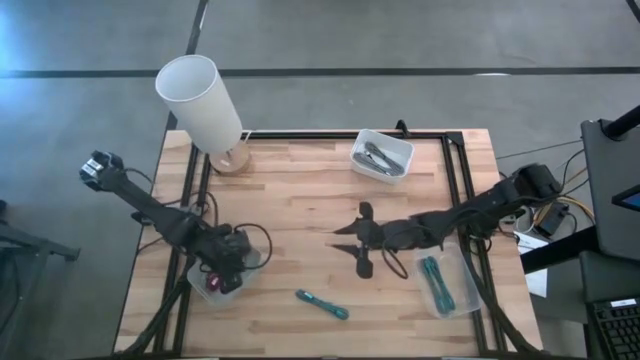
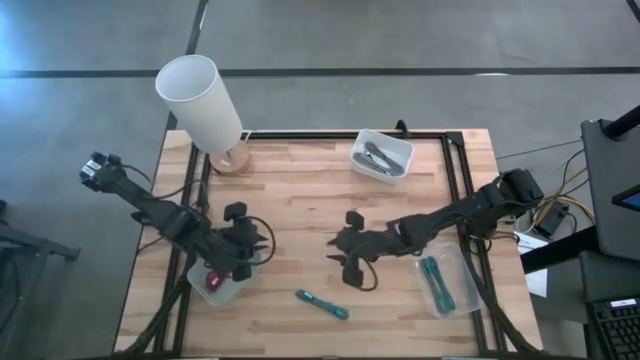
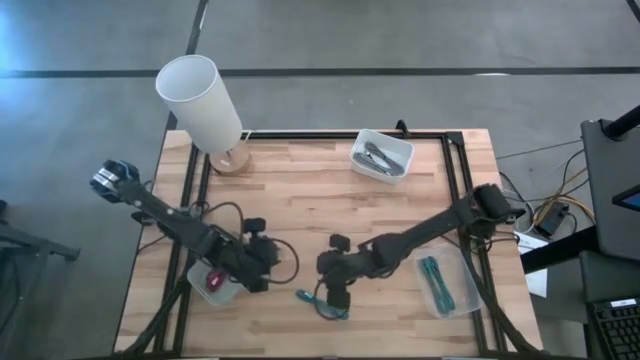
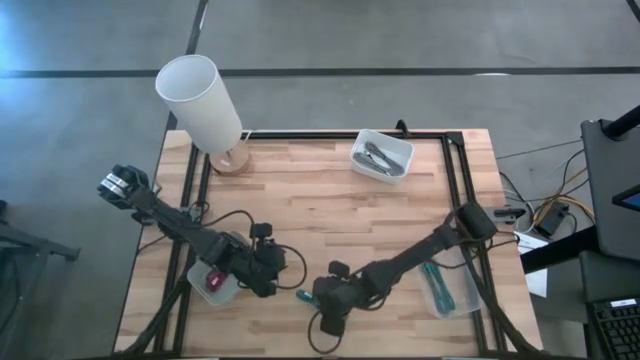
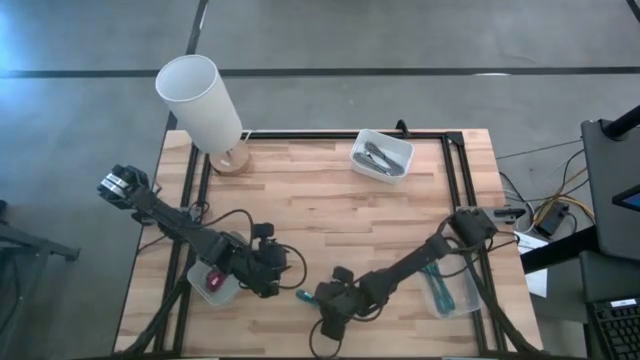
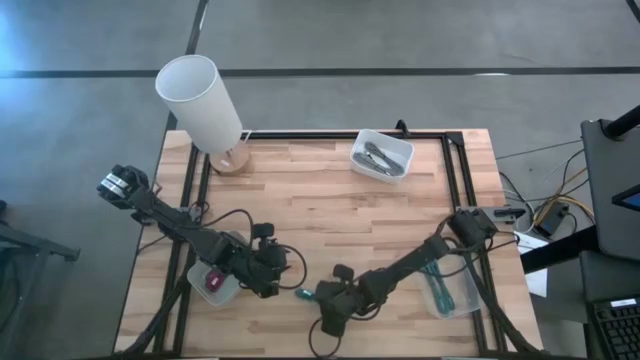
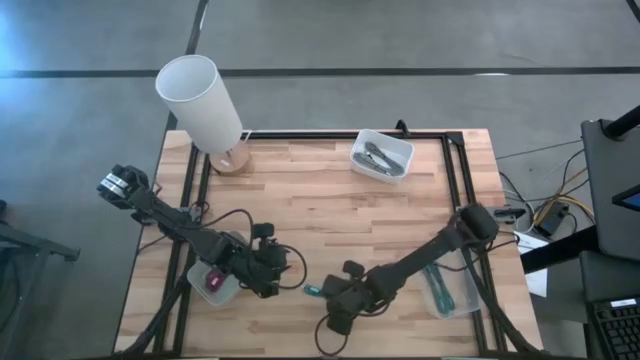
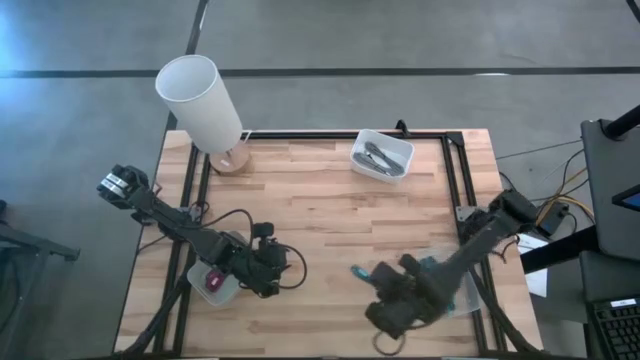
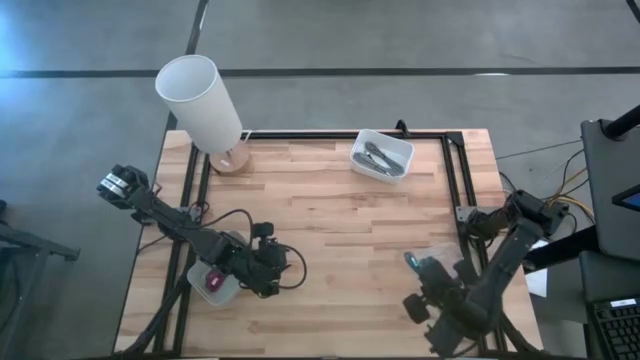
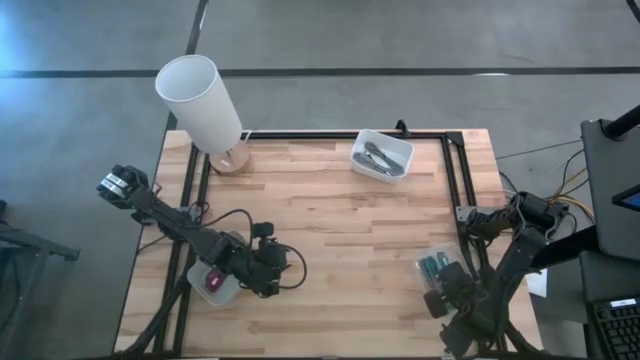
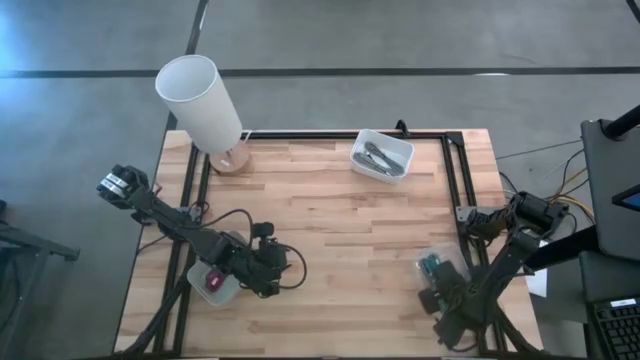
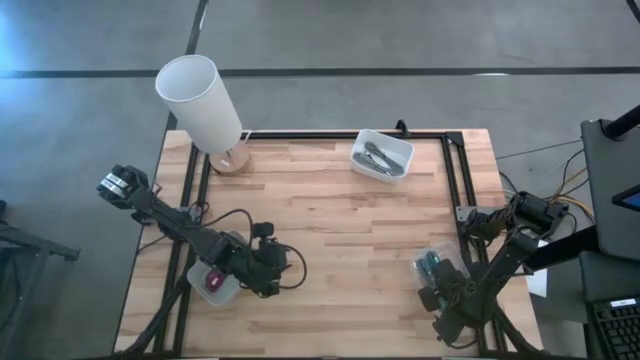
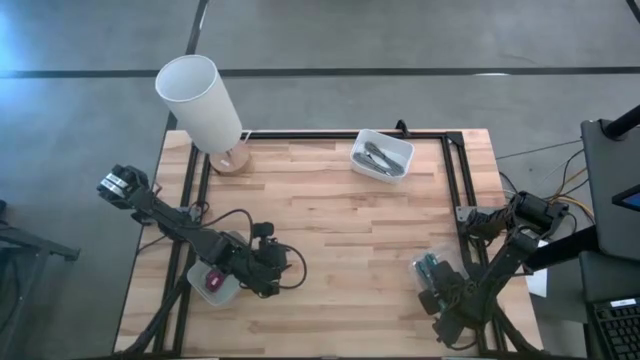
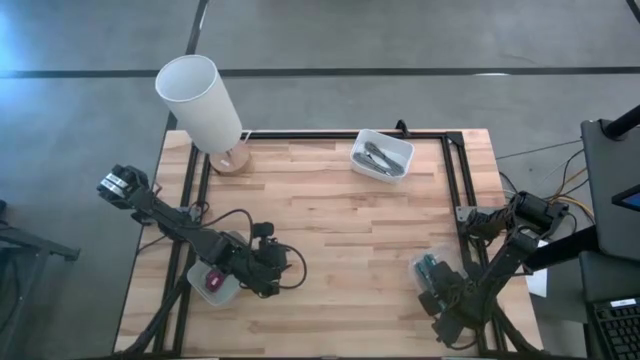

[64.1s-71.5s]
Task: Pick & Place USB Port
Put the blue patterned charger cable into the transparent bin

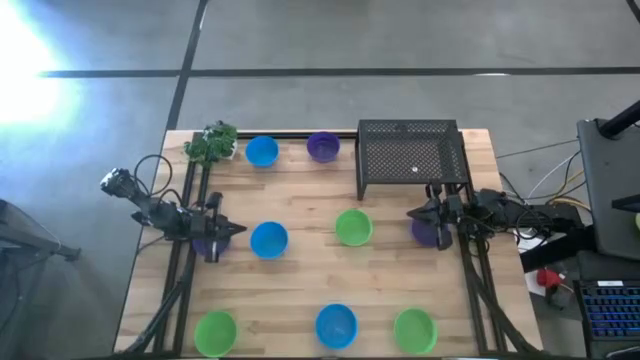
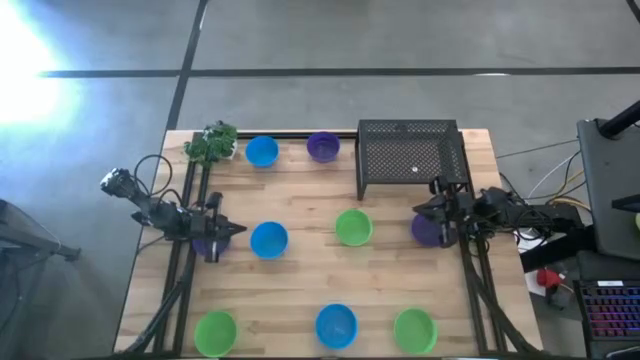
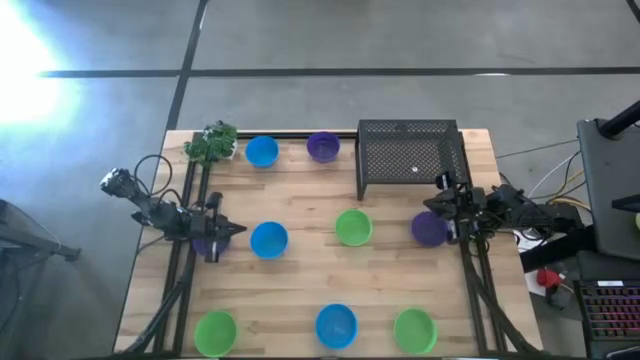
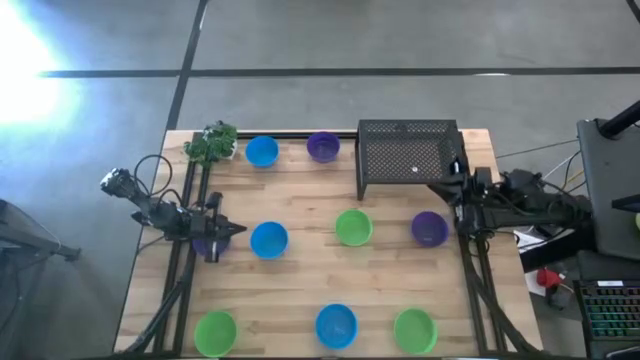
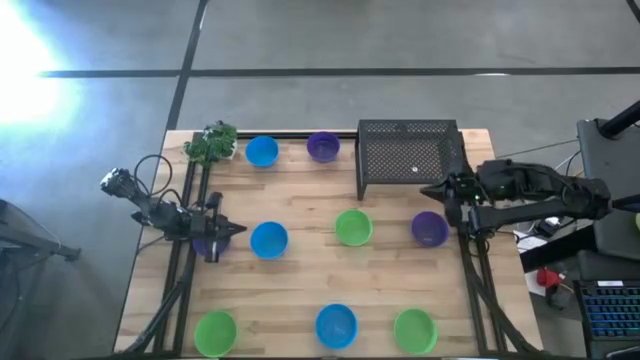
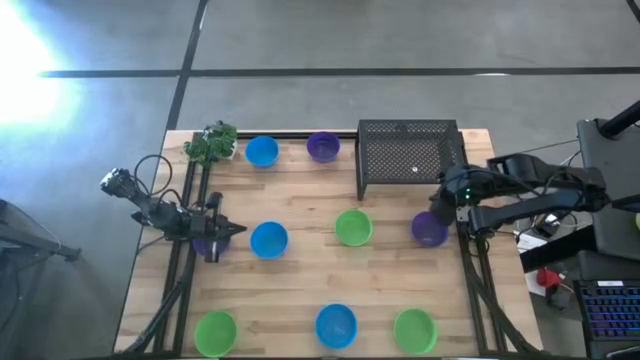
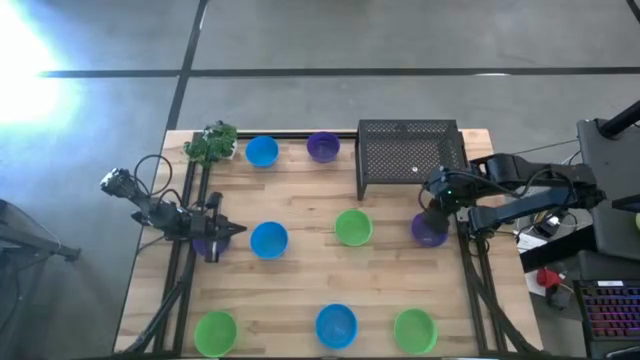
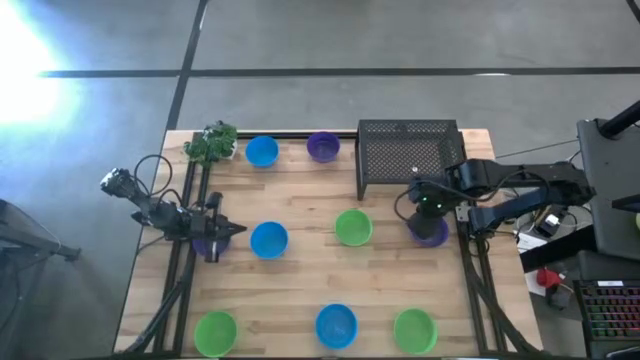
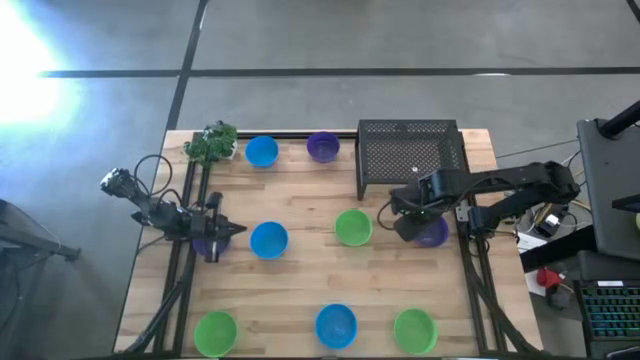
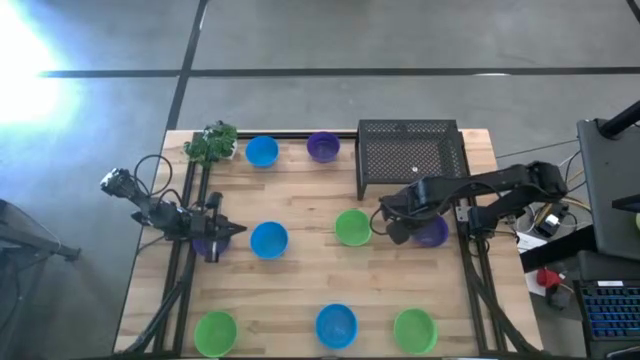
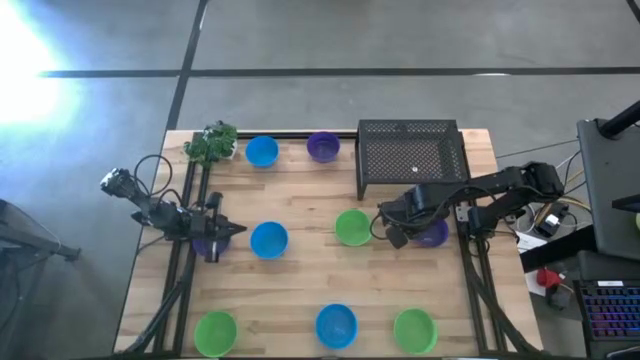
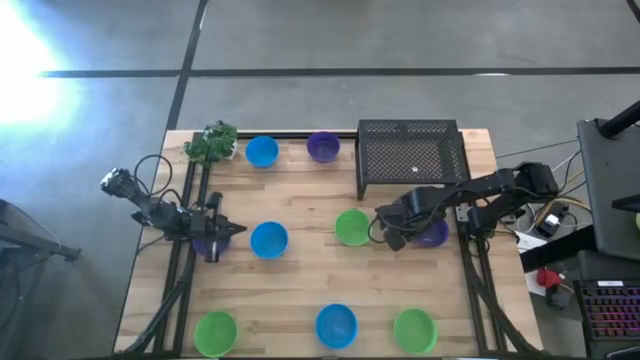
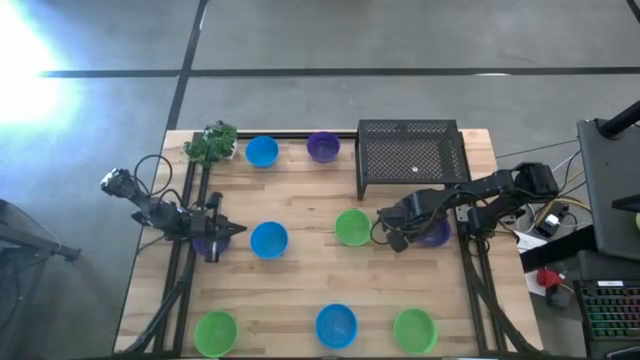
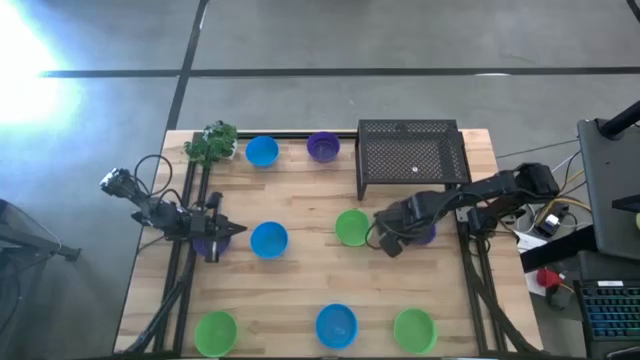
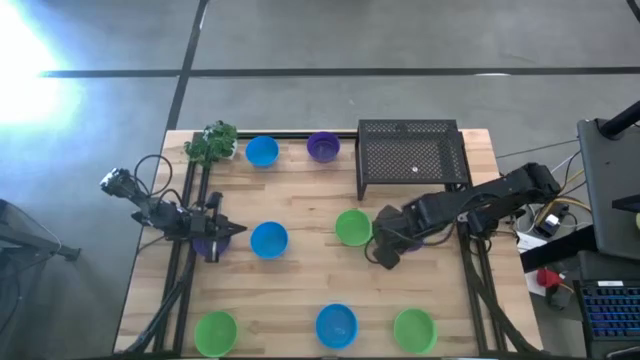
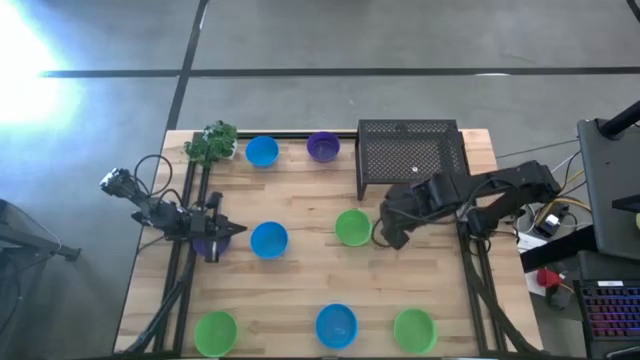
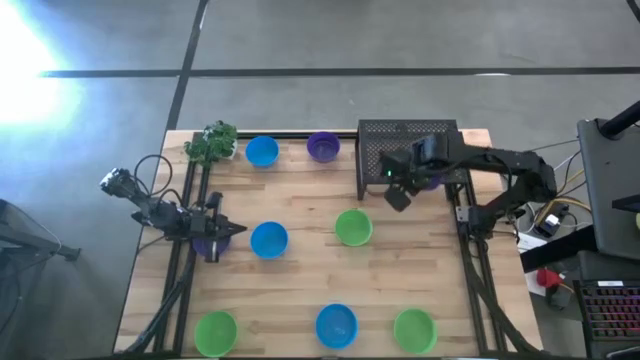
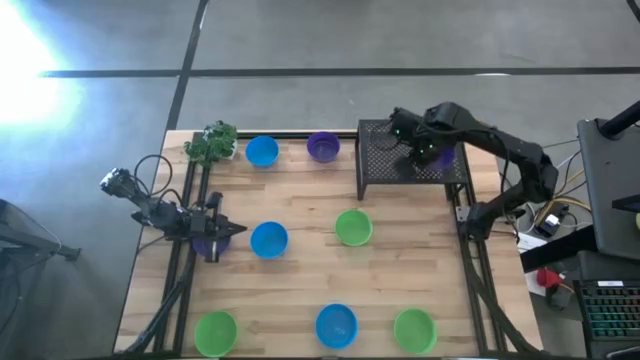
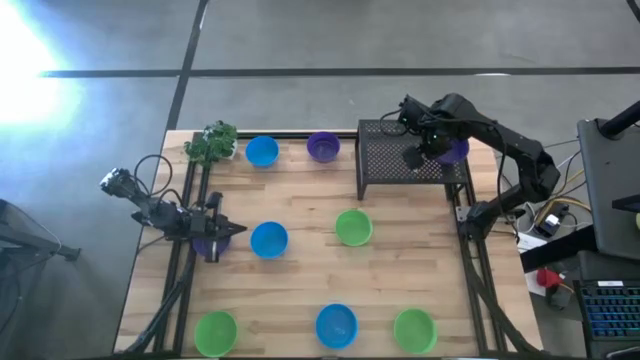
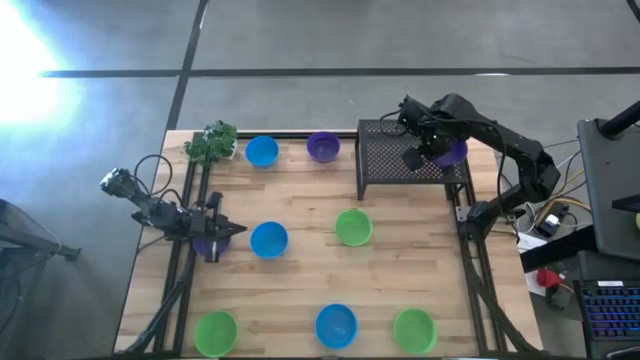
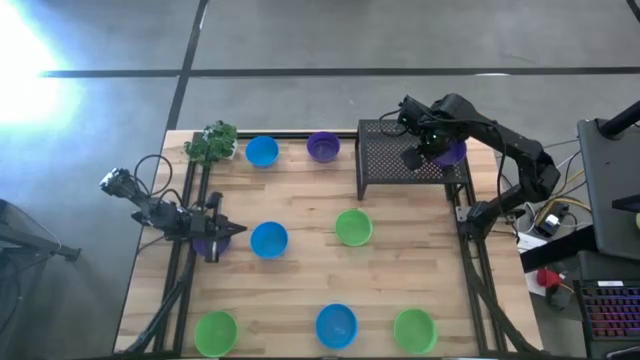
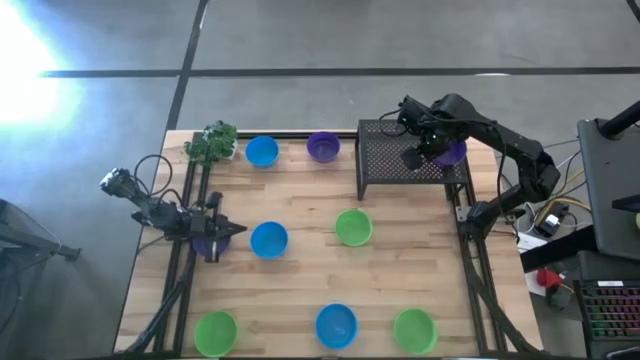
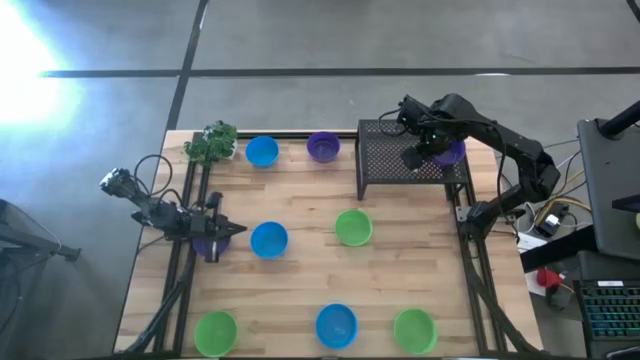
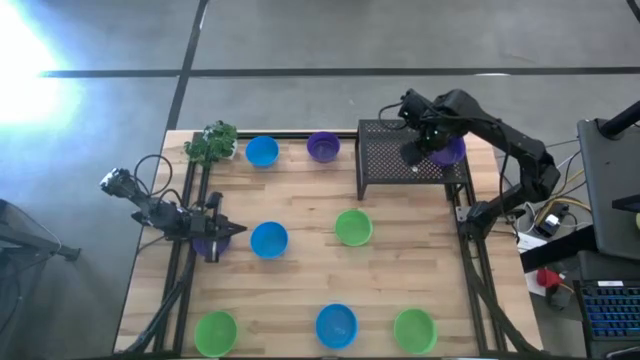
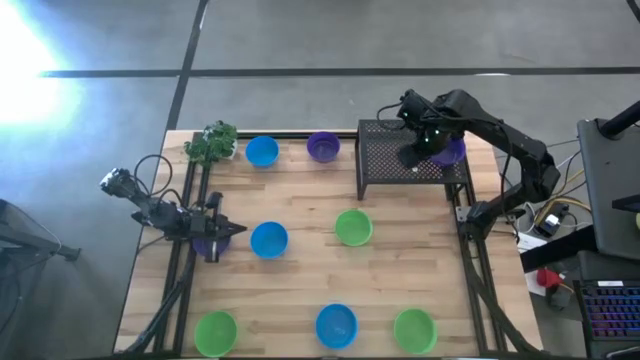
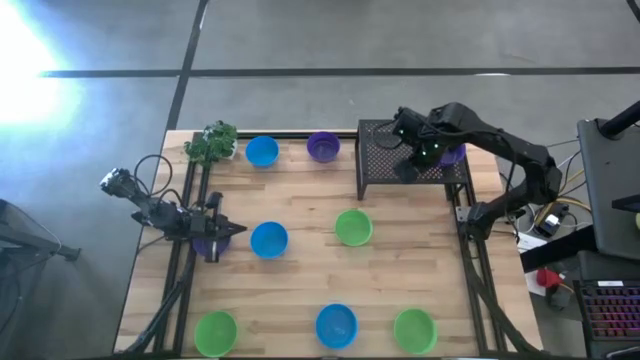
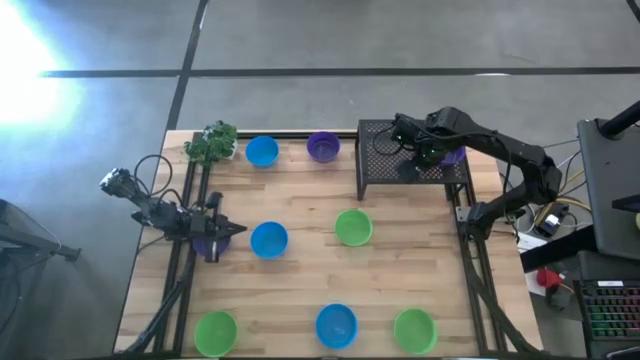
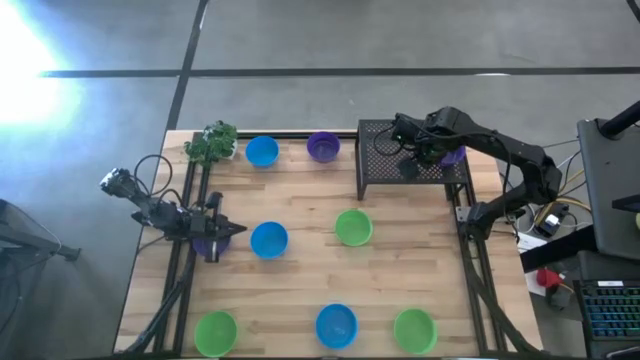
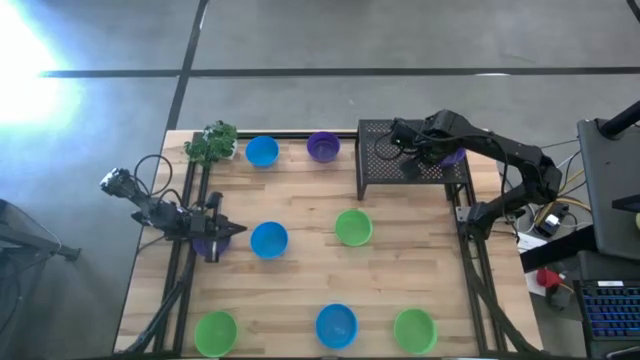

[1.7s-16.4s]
Task: Pick & Place Mini bowls
Put the right purple bowl on the shelf
